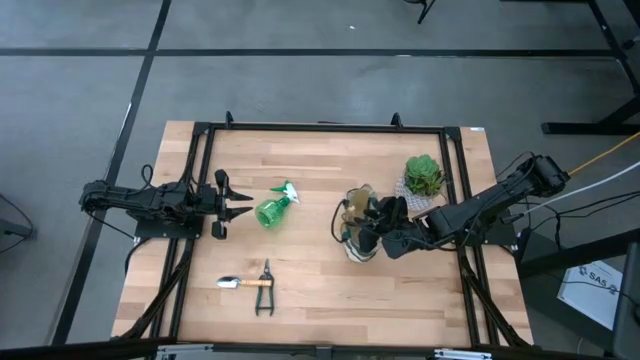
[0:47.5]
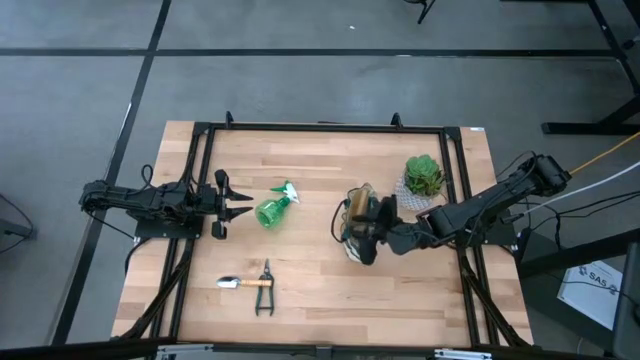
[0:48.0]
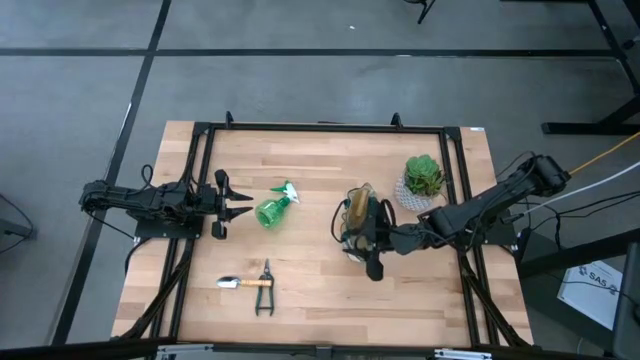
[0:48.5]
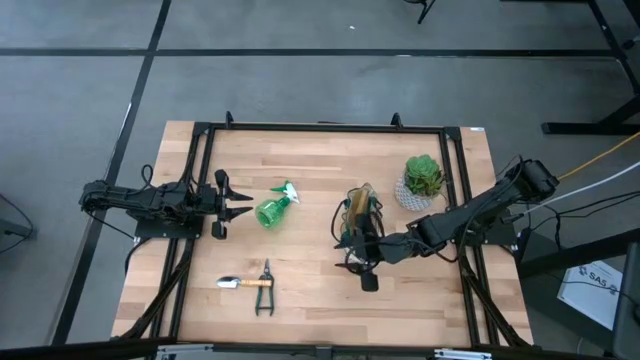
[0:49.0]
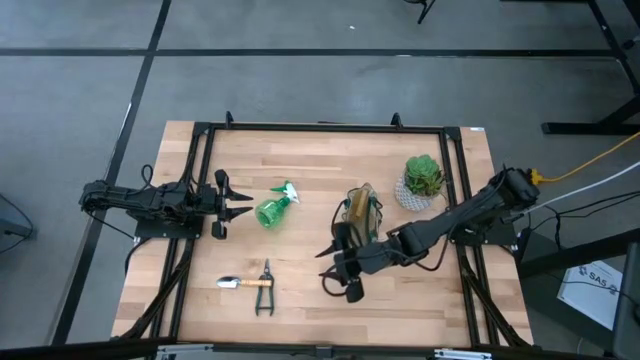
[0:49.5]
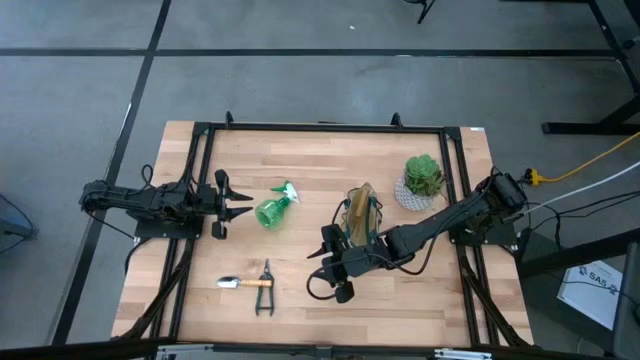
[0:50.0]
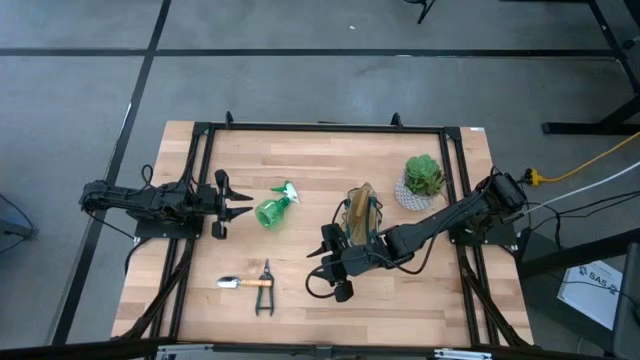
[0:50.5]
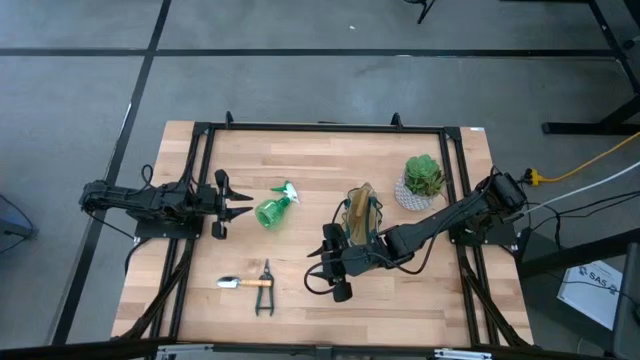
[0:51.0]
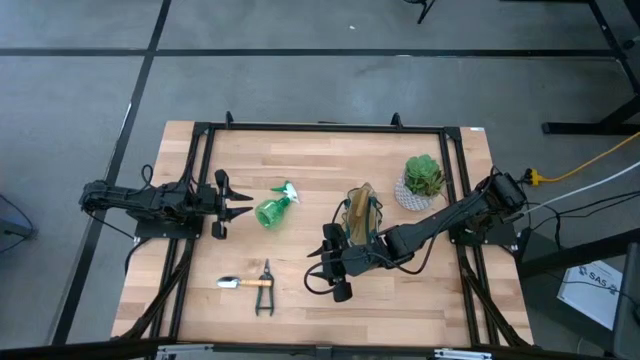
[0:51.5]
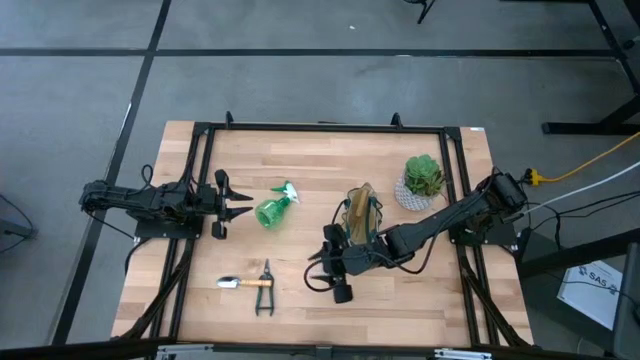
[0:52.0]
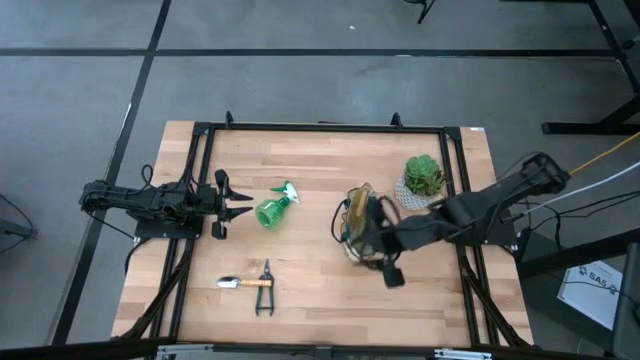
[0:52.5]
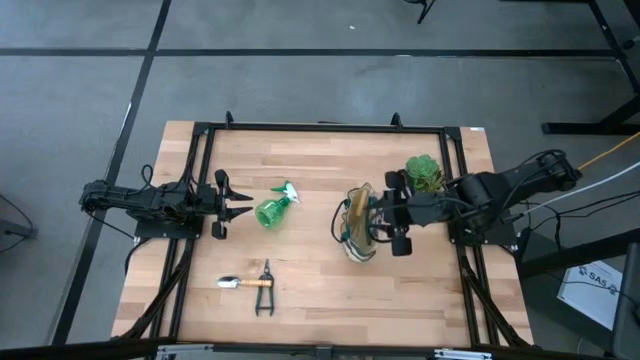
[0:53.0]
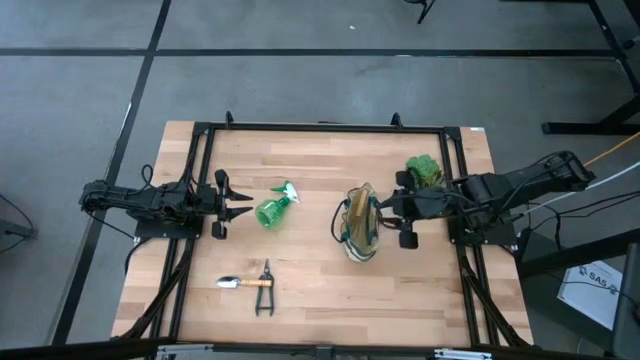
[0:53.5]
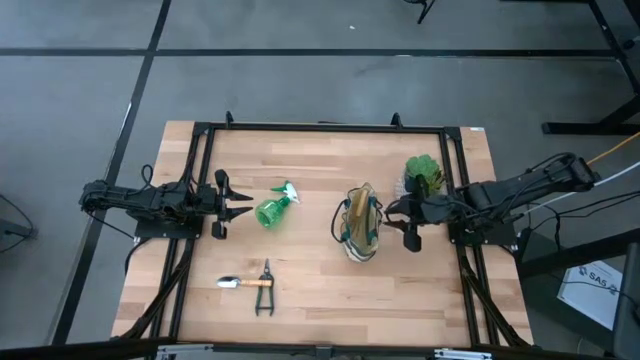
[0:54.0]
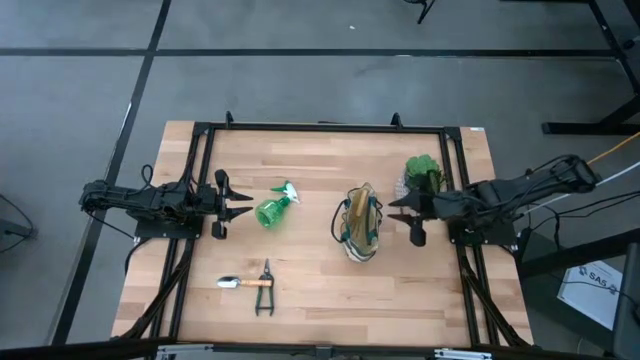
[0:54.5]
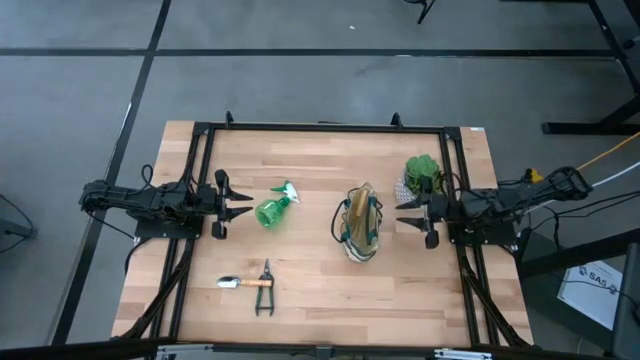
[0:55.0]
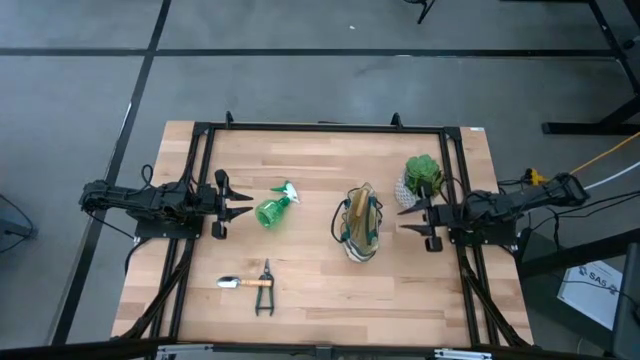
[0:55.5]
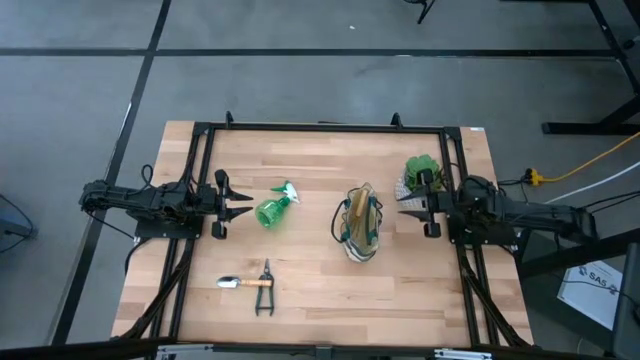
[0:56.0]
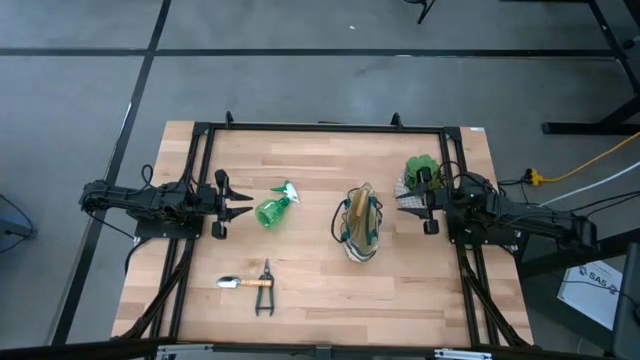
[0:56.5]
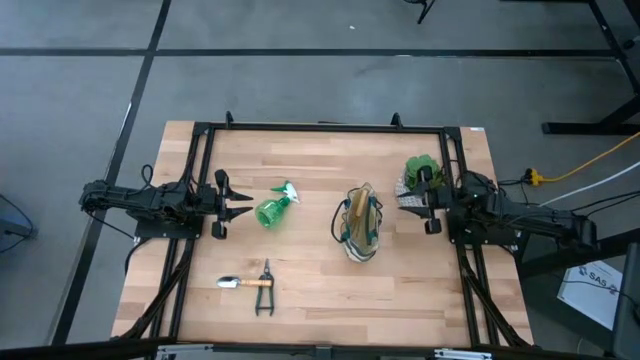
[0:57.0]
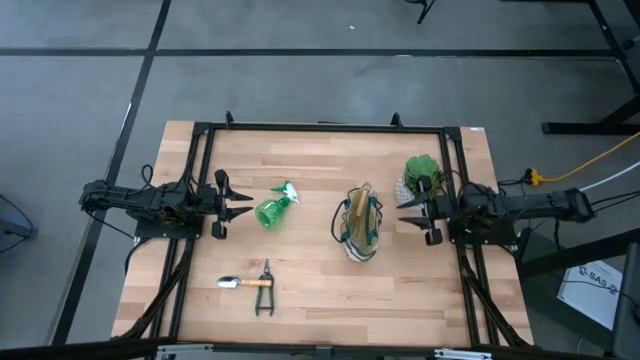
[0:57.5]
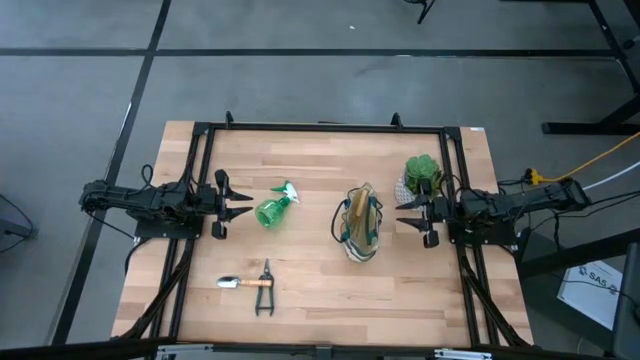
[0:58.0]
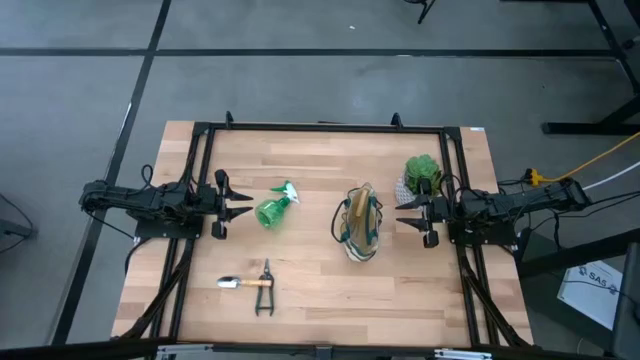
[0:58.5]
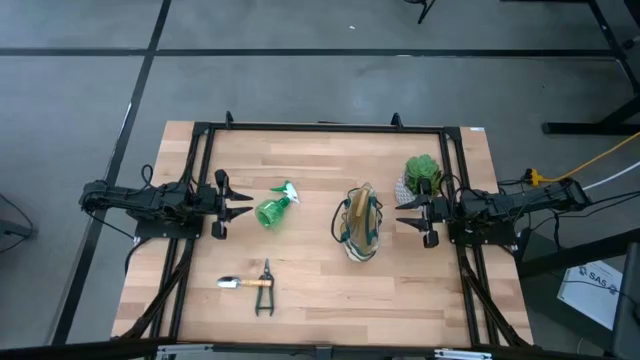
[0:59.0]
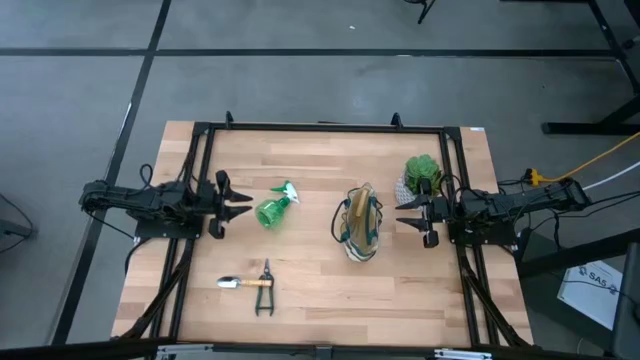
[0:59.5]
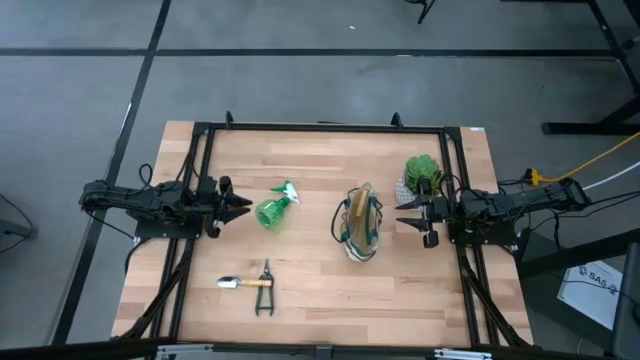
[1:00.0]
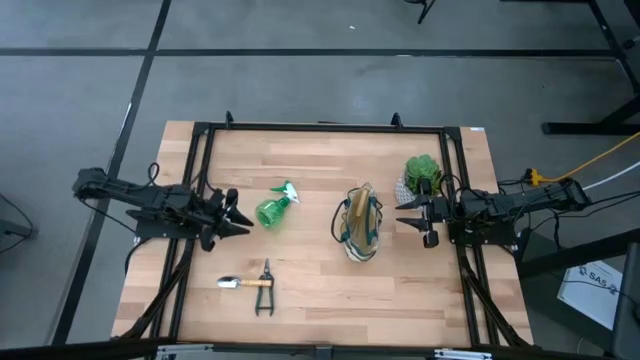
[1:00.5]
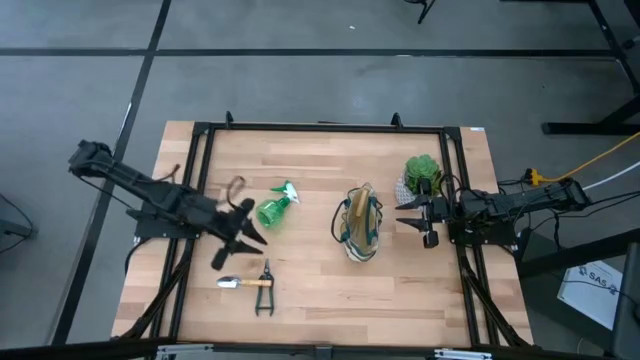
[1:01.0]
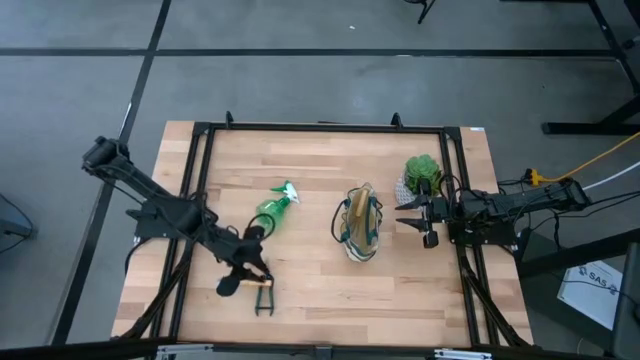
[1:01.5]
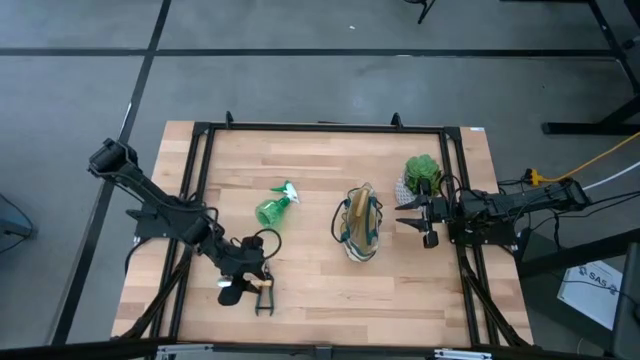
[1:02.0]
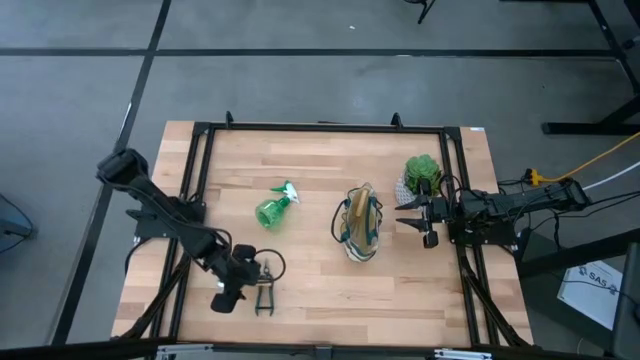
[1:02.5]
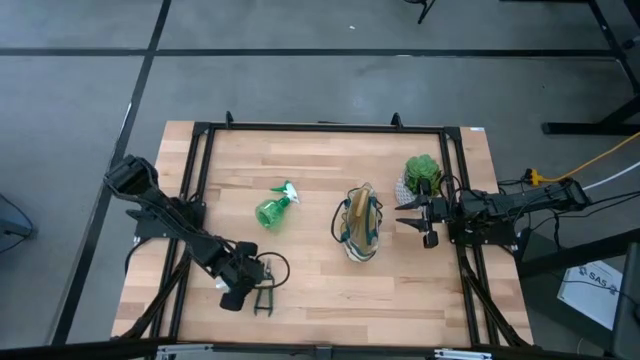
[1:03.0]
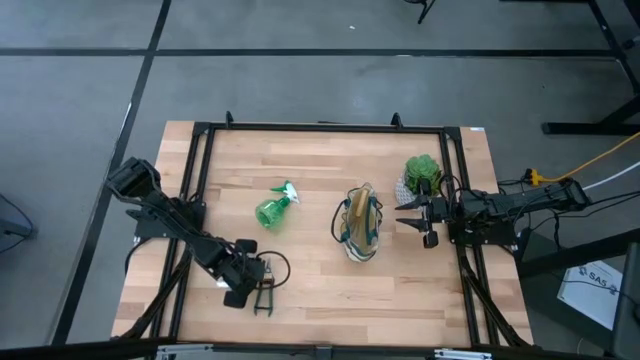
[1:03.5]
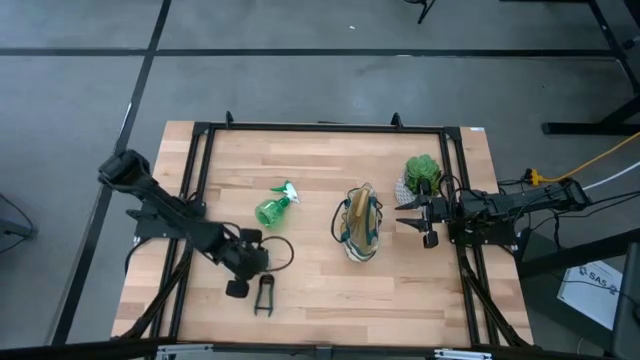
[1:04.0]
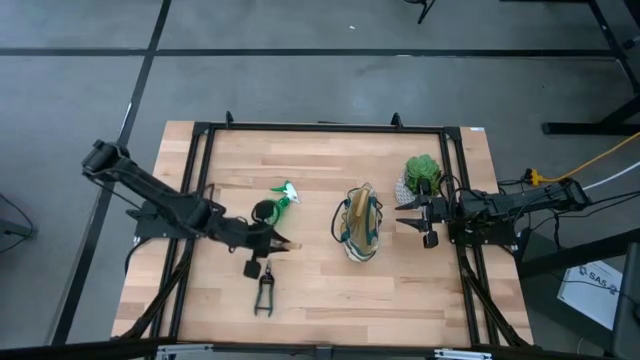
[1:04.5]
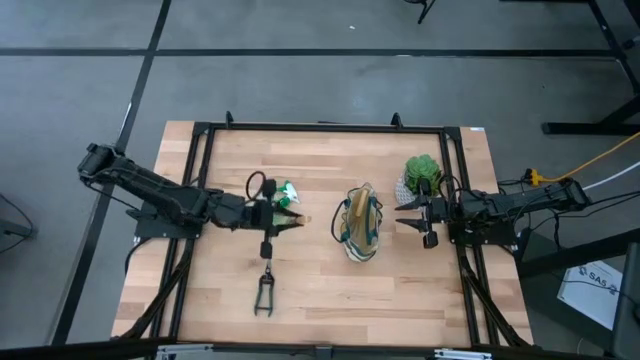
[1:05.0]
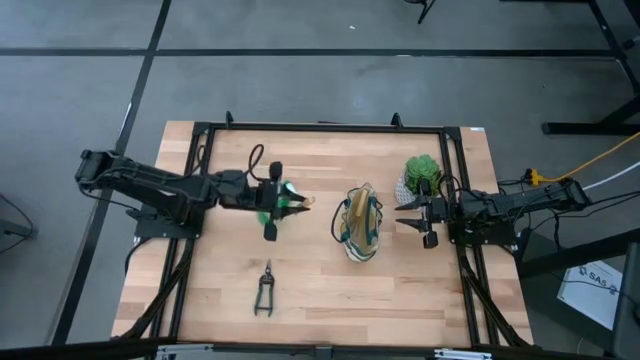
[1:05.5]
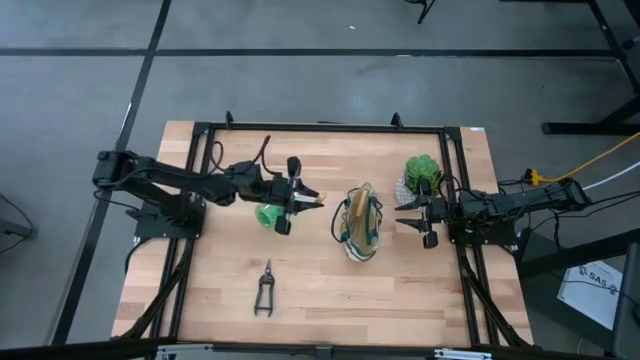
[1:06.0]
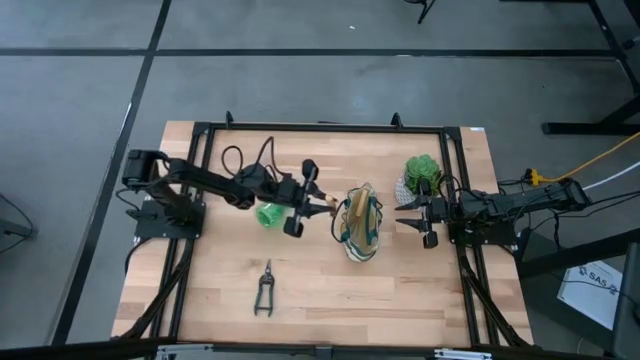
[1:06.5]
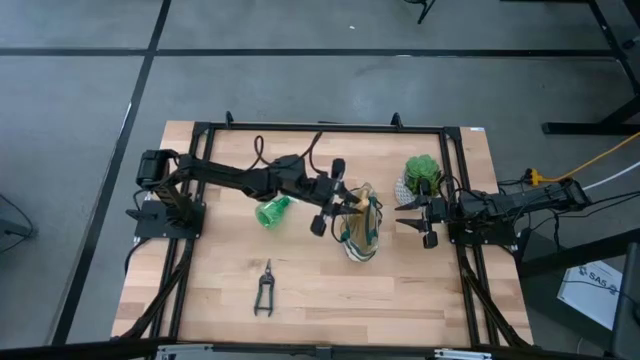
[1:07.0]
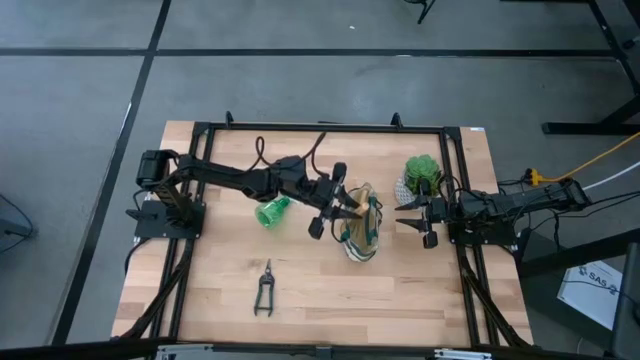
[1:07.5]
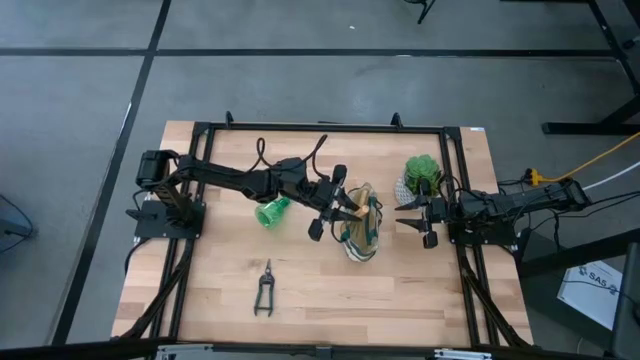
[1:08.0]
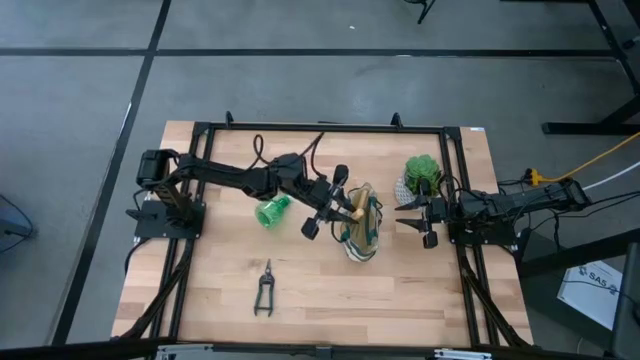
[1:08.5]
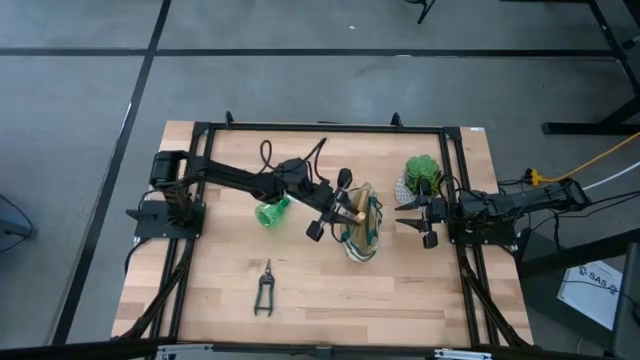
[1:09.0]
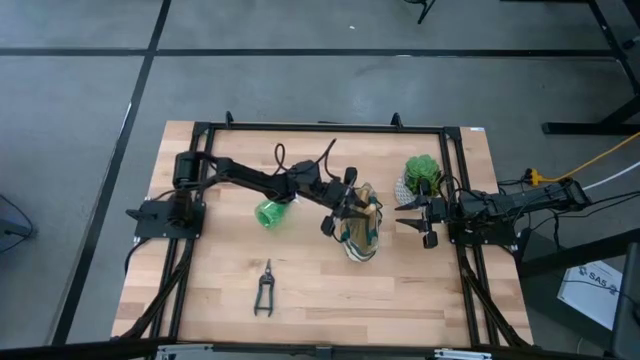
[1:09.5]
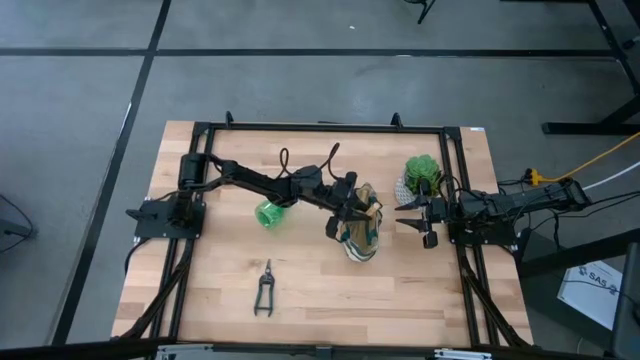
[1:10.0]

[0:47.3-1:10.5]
Task: Pick & Place Garden tools in Gardening bag
Put the light brown trowel into the white gardening bag
